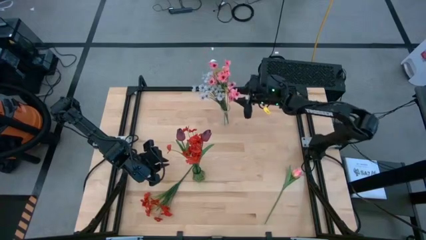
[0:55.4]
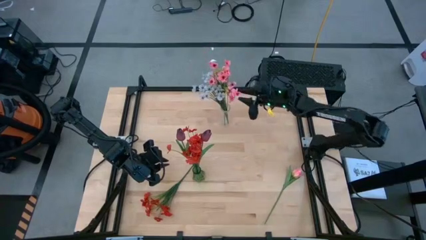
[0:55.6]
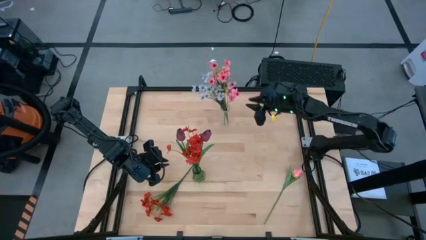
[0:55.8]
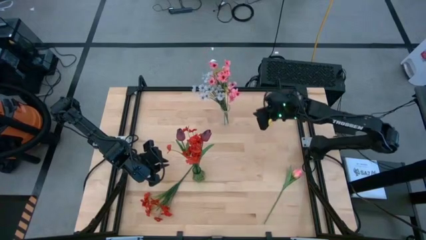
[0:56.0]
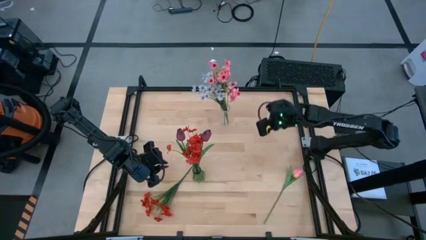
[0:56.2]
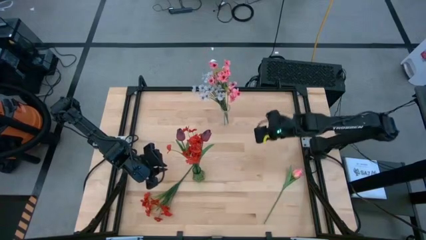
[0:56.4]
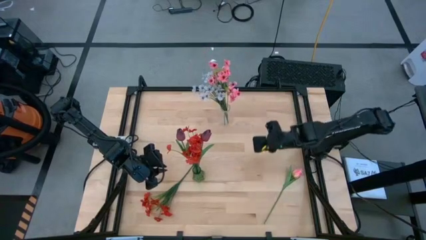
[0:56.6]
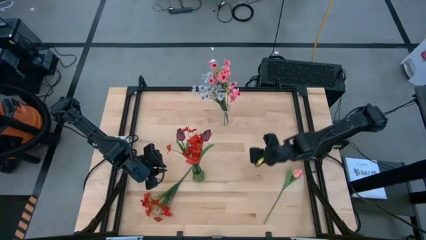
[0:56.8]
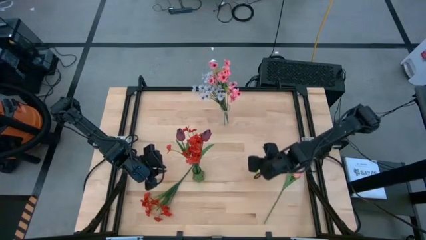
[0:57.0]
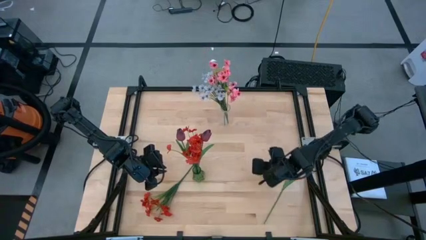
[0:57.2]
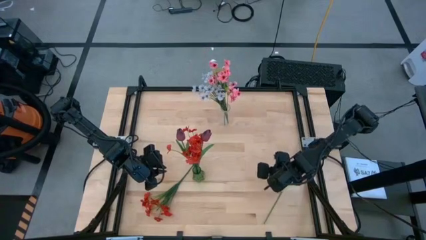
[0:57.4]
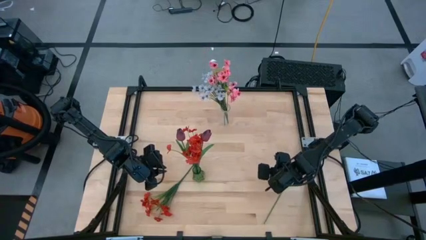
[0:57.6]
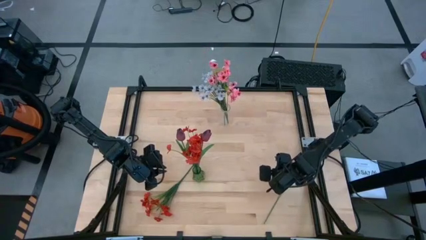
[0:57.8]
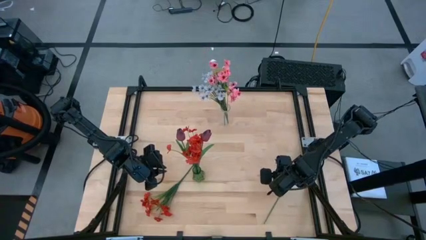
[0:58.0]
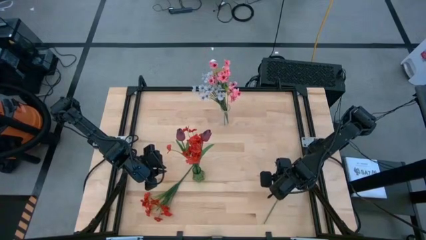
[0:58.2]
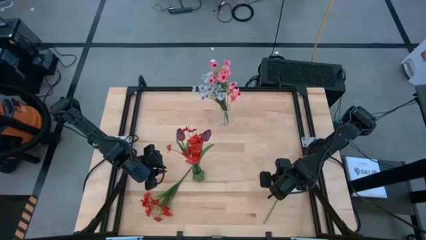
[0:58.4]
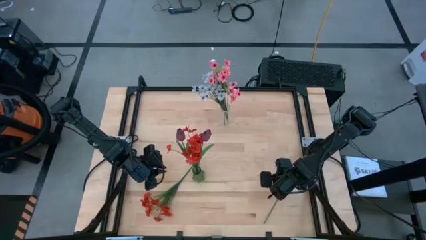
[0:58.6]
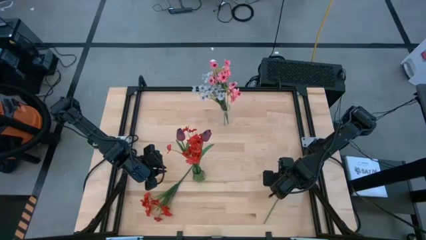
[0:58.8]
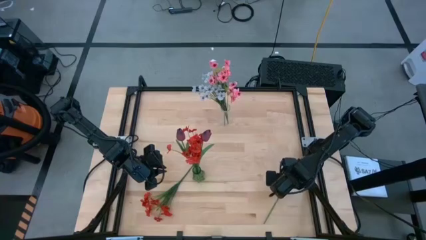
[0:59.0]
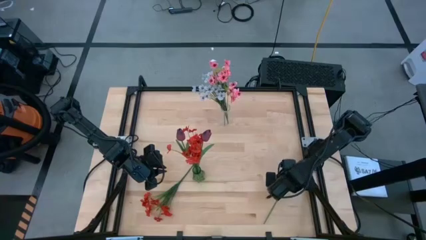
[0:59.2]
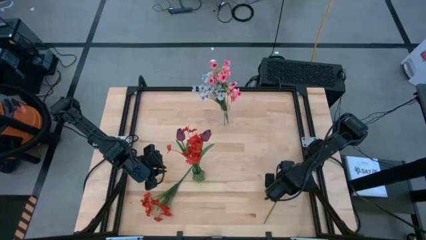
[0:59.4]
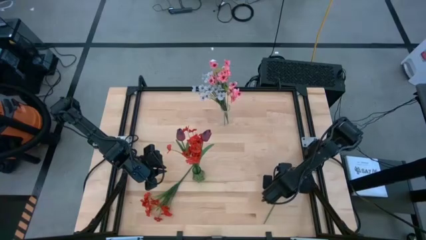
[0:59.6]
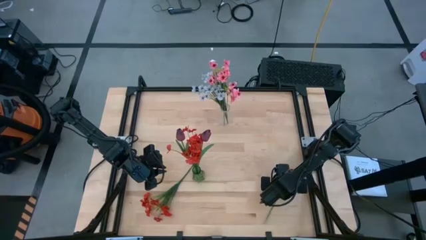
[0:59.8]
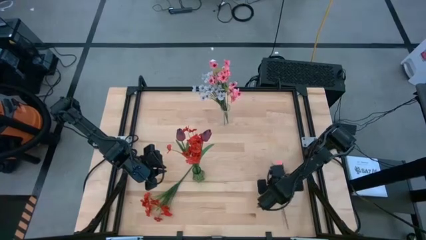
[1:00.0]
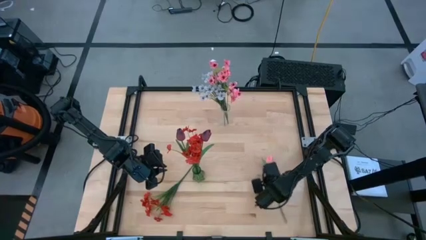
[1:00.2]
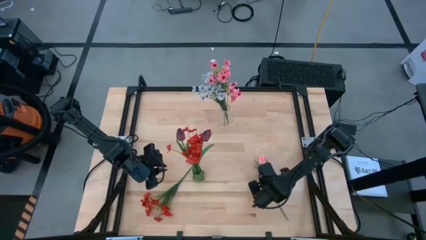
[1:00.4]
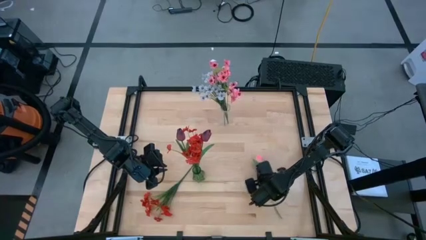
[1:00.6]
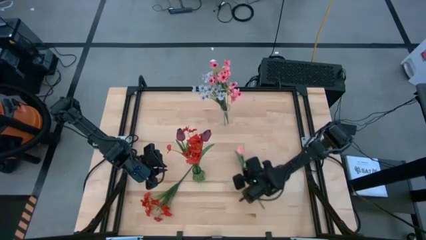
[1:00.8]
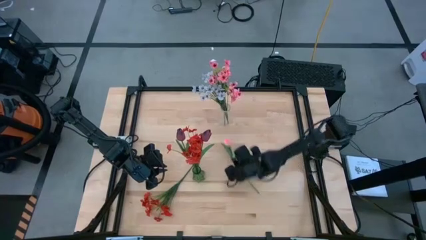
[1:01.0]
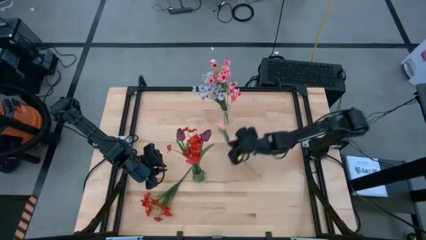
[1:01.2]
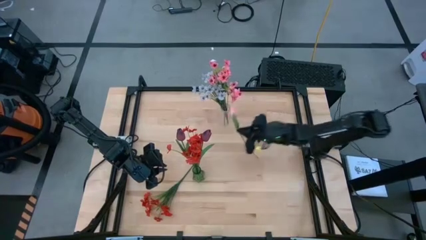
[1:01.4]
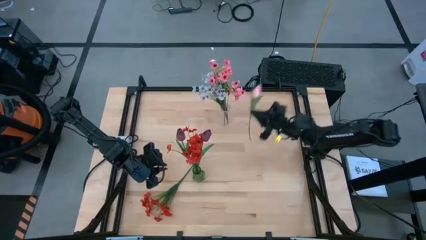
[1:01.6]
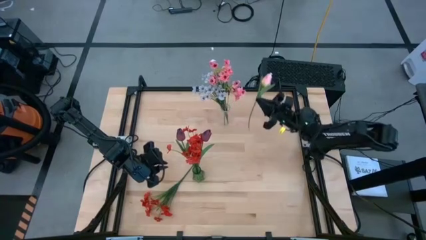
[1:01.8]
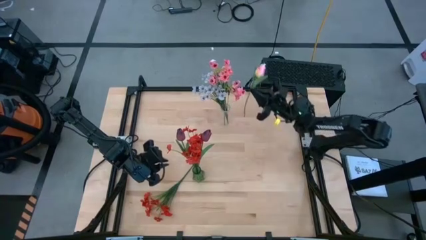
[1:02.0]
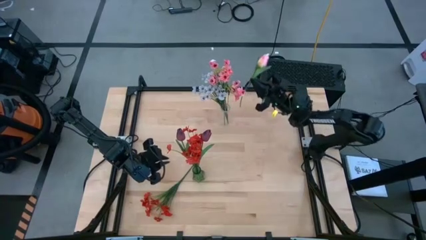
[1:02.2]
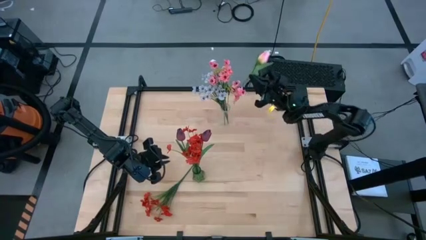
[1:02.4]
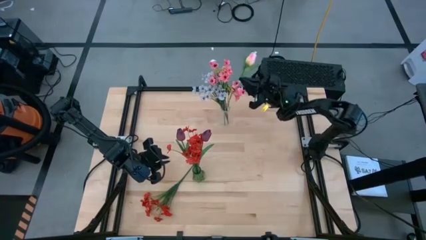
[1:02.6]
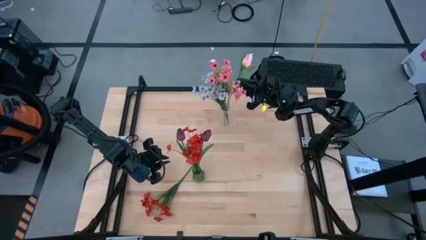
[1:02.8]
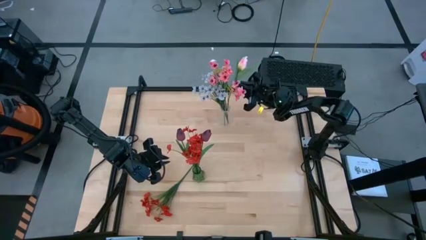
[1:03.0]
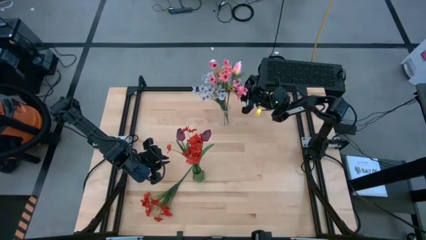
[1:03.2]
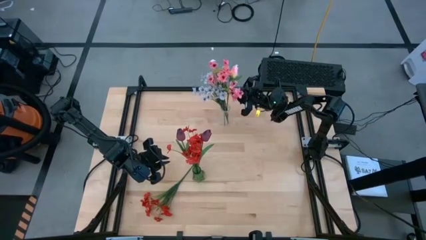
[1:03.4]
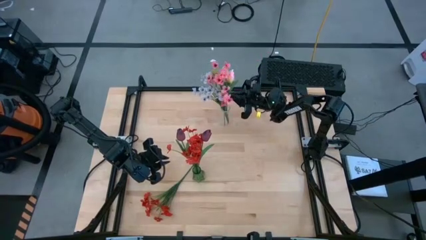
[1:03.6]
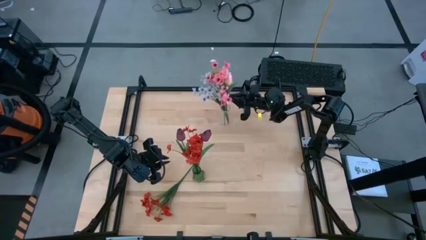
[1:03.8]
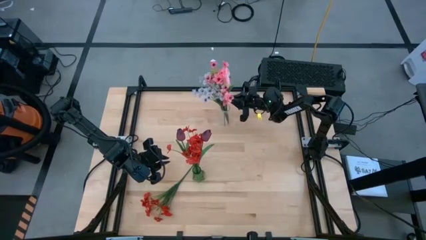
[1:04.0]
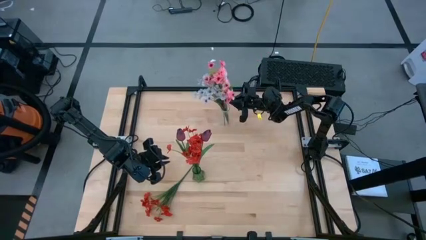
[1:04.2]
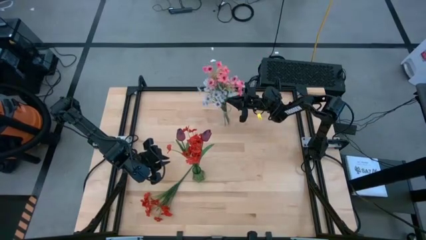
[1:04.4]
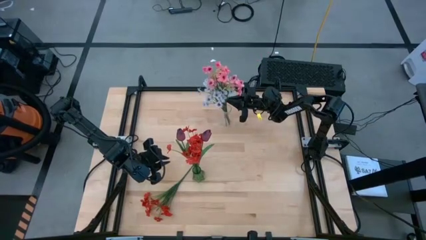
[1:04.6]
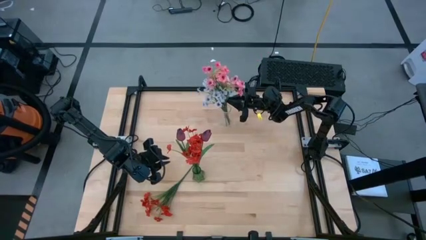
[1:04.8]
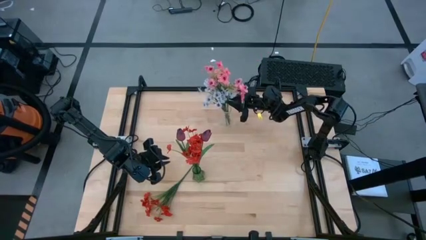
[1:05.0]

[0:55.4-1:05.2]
Task: Sort flowers into vase by color
Put the pink flower into the transparent flower vase

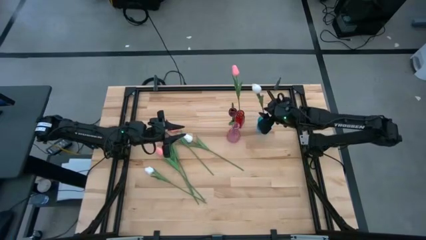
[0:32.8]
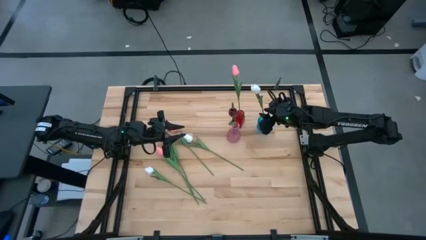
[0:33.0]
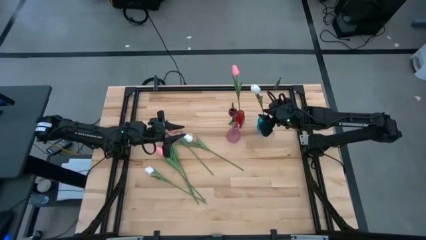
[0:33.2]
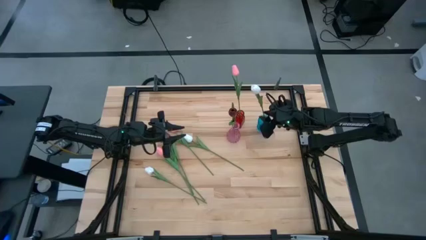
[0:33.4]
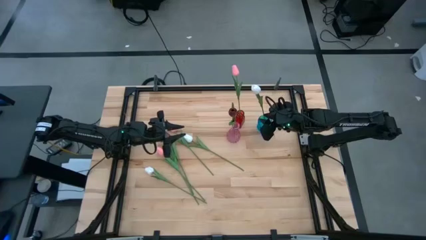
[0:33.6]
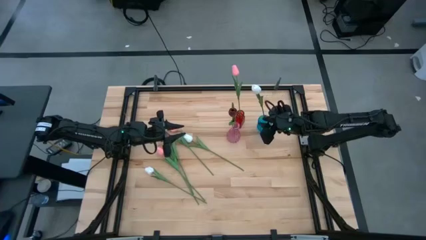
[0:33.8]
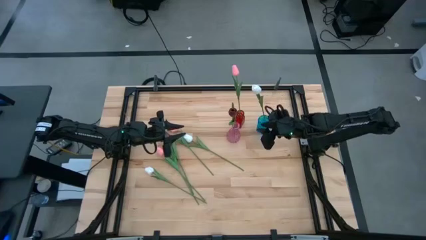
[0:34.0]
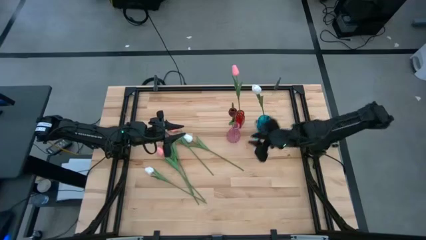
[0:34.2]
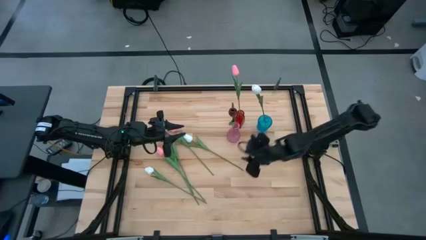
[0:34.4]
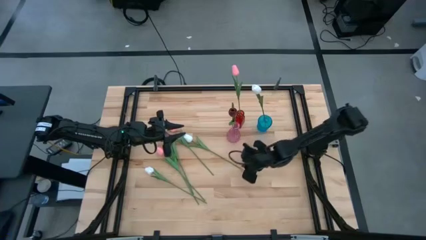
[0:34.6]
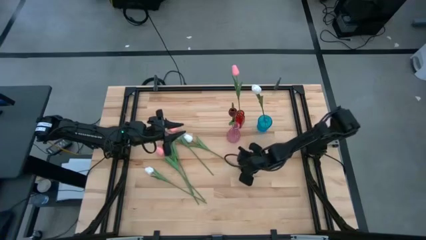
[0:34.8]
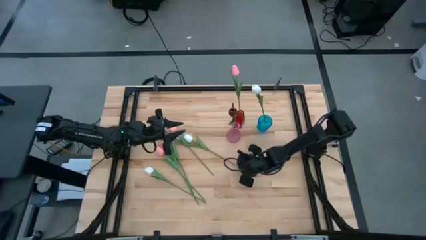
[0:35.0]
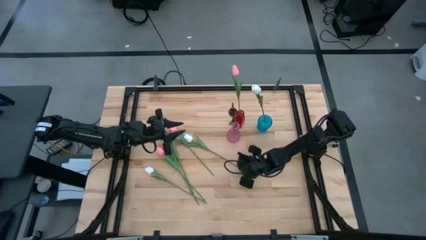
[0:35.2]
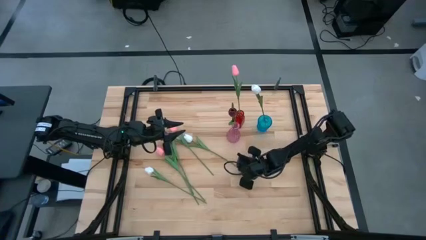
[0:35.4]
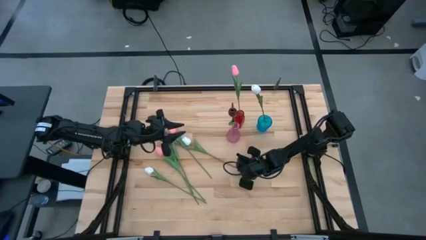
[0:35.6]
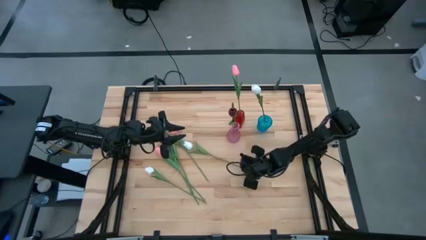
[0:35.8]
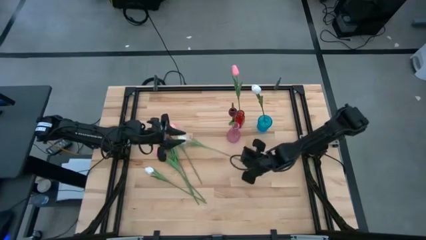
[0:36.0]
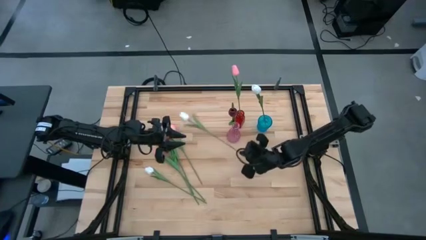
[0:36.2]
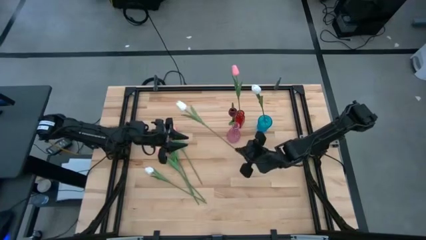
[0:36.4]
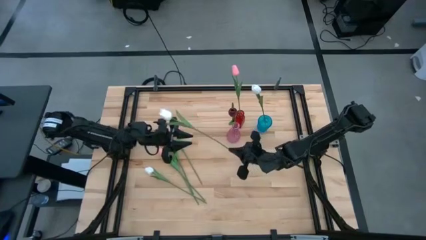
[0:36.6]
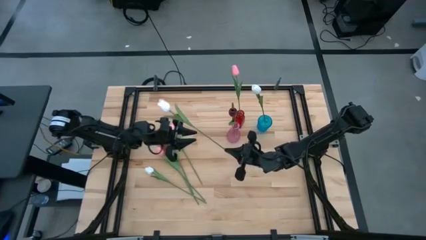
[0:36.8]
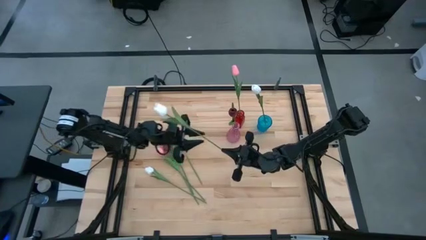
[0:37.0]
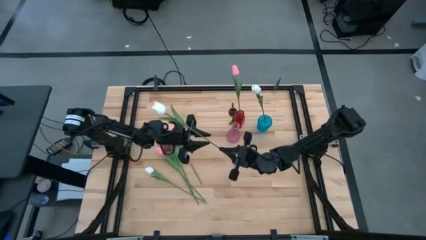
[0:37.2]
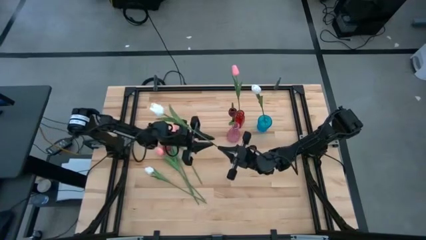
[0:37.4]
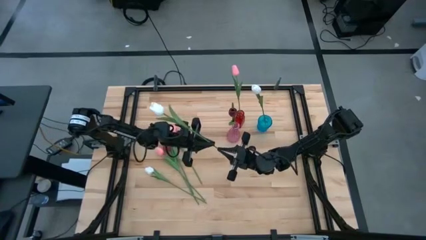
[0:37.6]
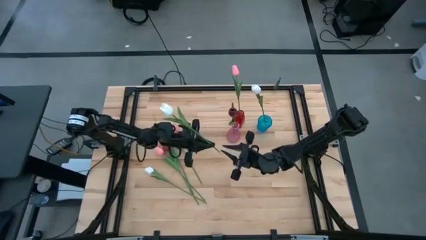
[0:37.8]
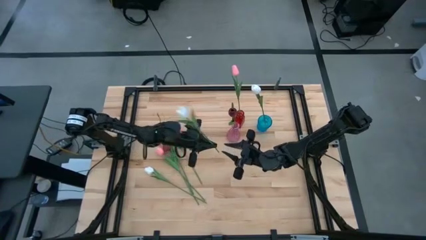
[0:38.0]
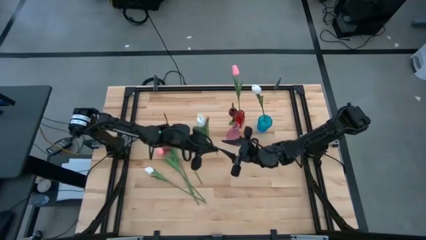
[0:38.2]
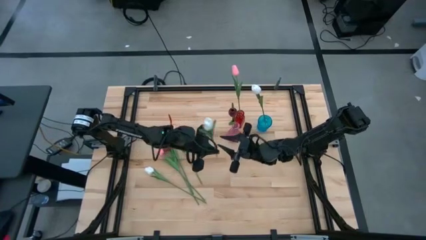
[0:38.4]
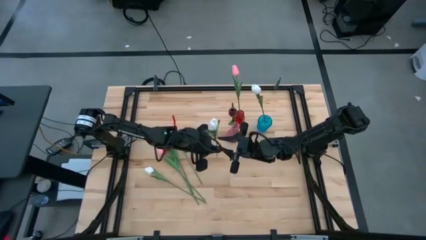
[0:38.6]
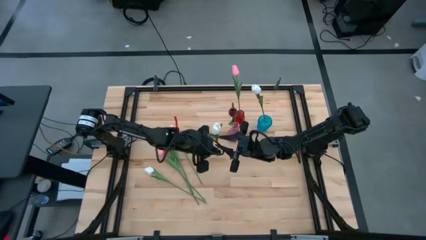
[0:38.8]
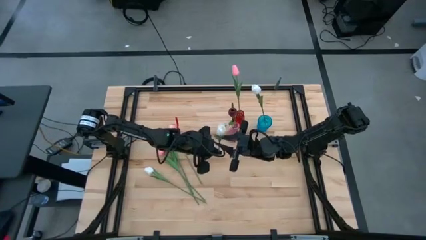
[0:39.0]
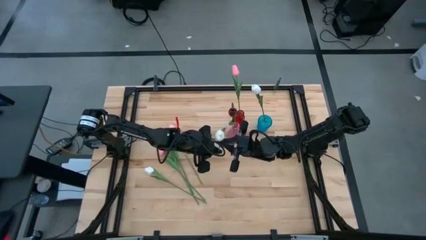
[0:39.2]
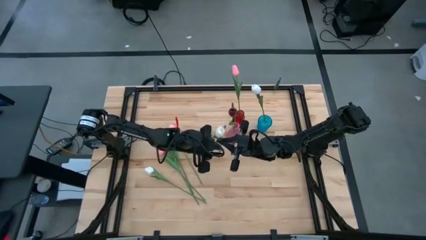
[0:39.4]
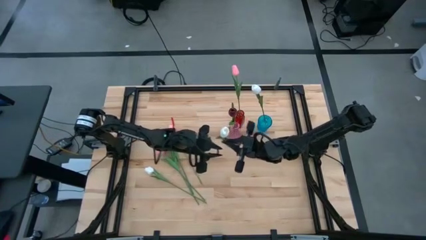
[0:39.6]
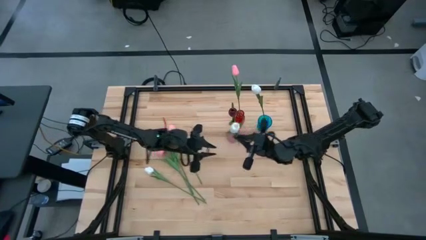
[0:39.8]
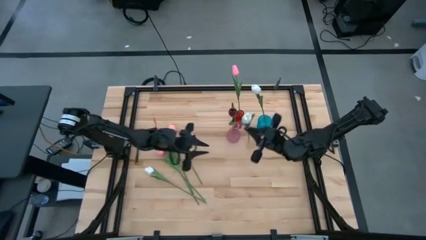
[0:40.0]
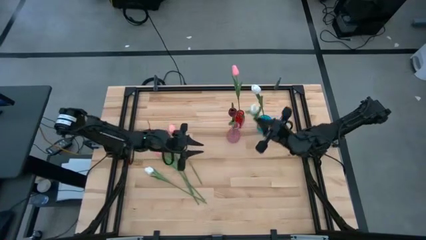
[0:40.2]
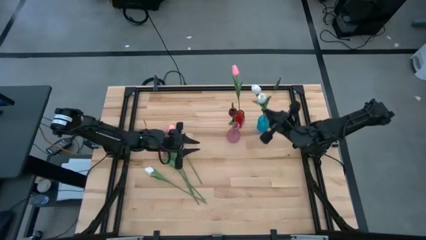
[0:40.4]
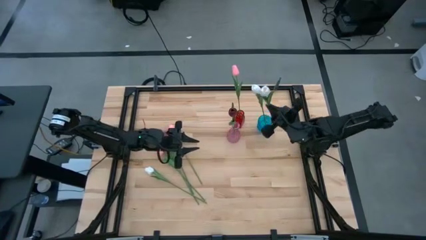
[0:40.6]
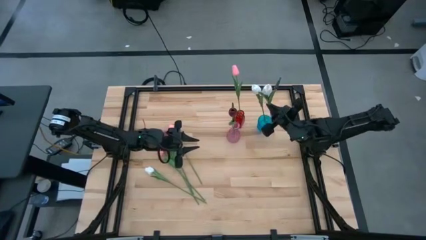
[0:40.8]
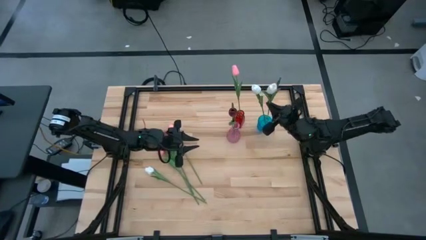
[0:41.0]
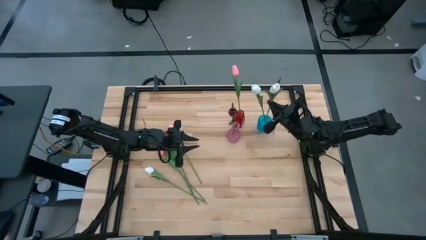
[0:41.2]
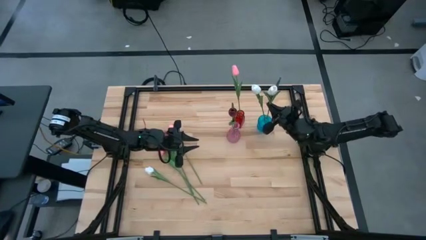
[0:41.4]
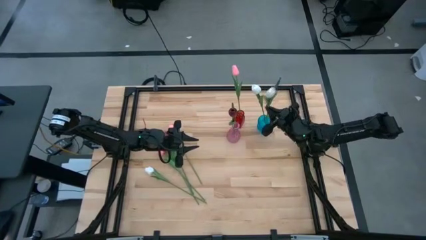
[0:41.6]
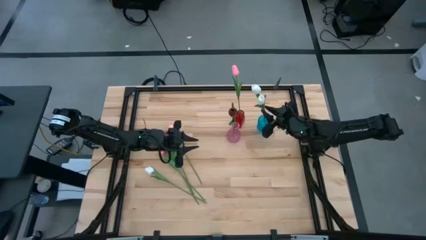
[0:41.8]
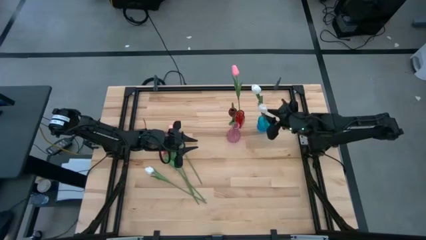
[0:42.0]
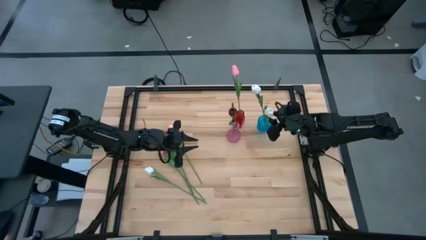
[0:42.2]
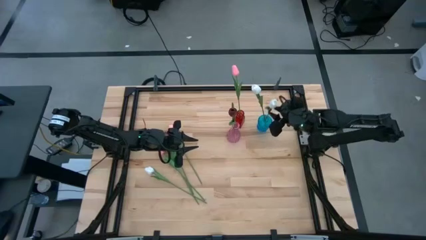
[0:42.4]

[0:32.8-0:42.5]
Task: Sort flowers into vase by color
Put the top white flower into the blue vase
